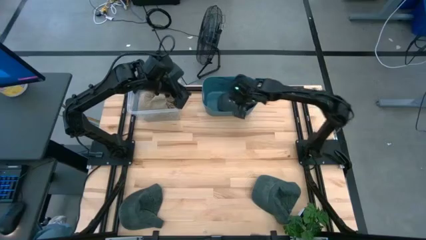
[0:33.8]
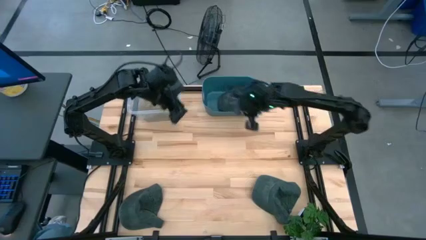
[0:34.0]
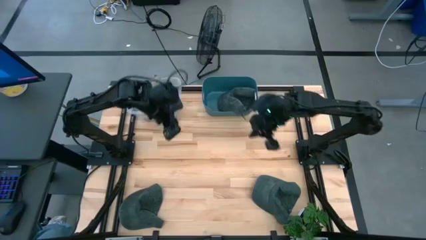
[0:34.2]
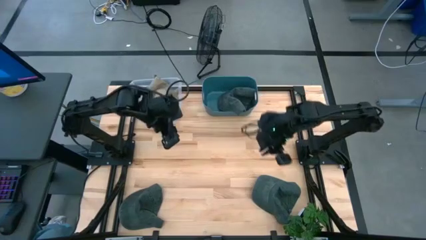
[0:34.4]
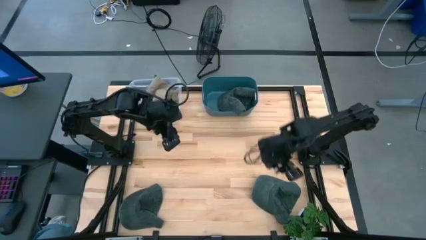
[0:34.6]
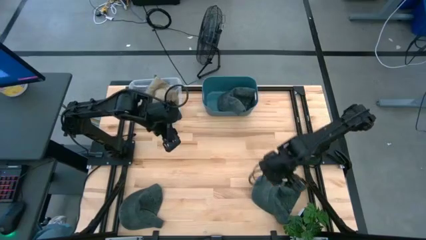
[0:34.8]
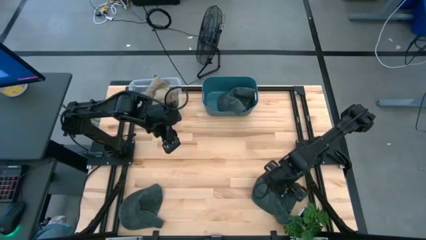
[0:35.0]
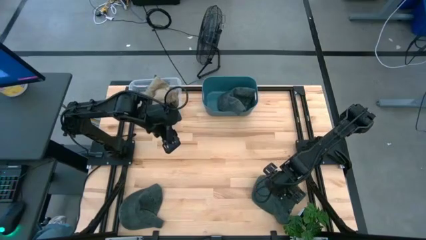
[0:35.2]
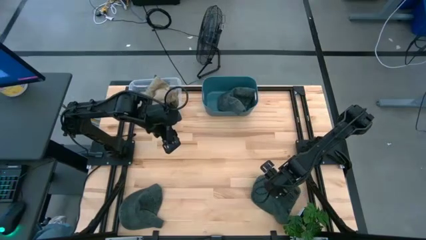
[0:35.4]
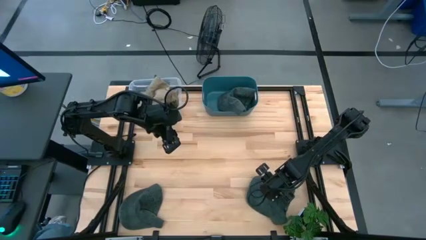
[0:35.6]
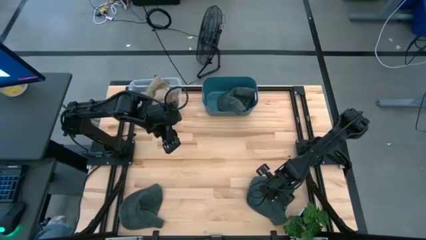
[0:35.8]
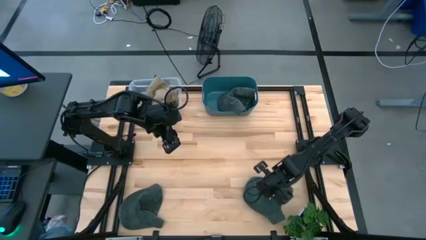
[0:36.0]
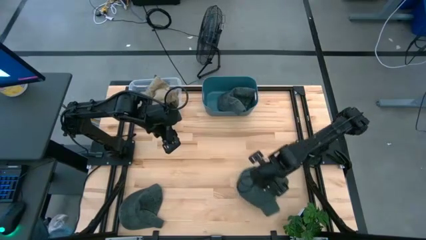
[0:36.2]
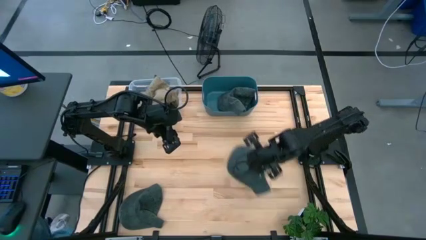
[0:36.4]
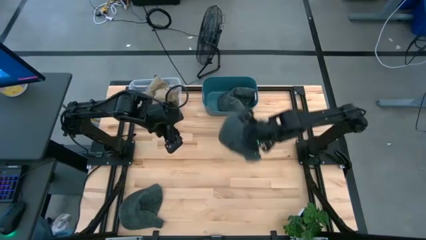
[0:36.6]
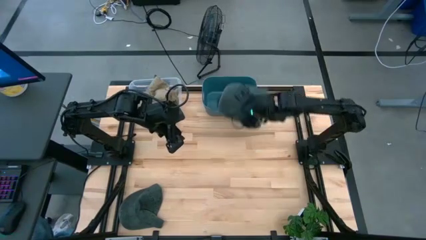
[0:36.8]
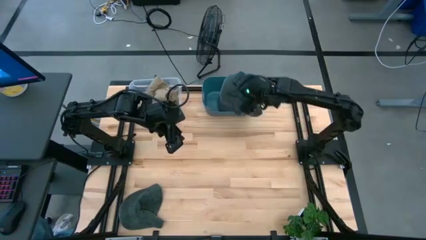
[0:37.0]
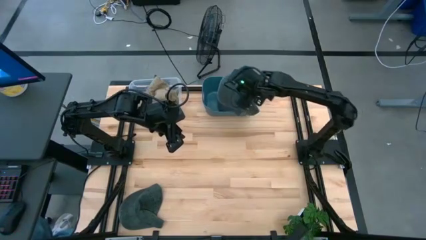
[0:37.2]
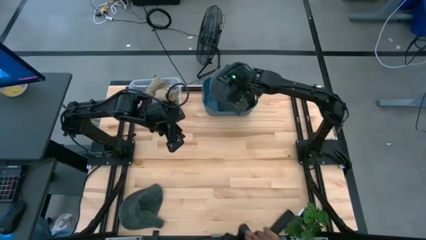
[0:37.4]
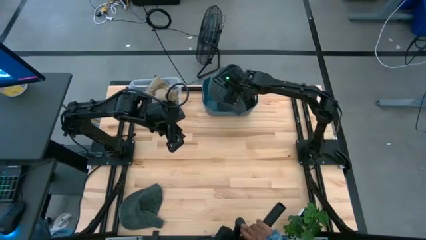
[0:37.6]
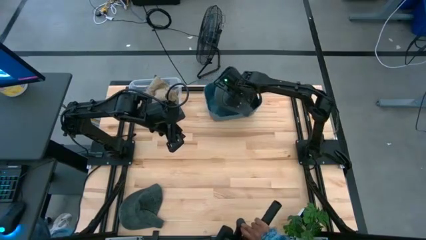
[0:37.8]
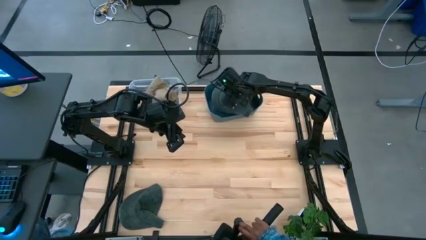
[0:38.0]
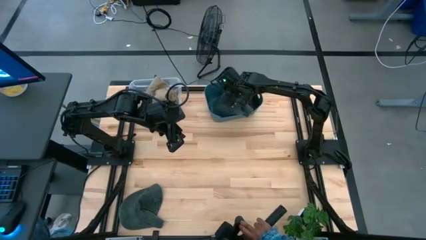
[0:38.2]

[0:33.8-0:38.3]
Task: Pick & Place hat
Put the right gray cap into the green bin

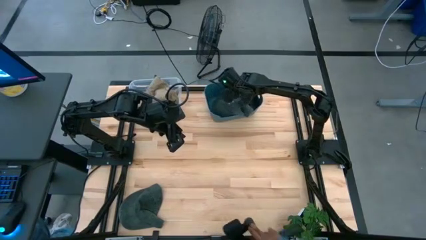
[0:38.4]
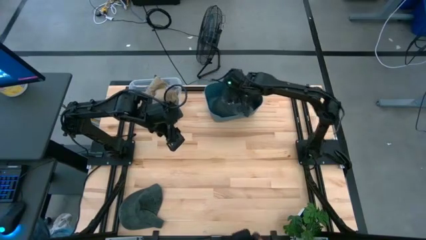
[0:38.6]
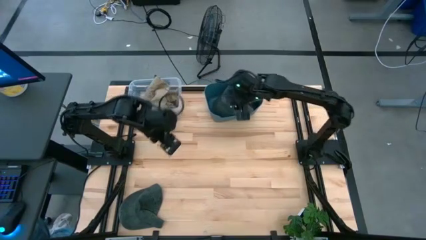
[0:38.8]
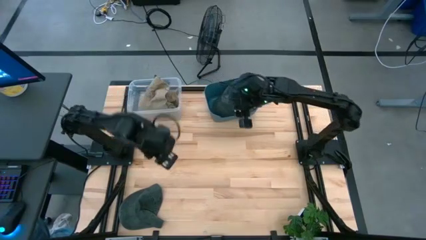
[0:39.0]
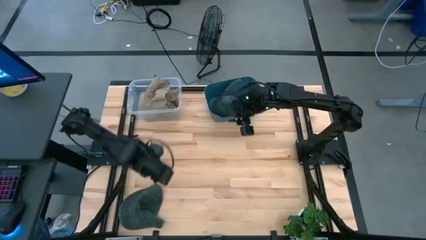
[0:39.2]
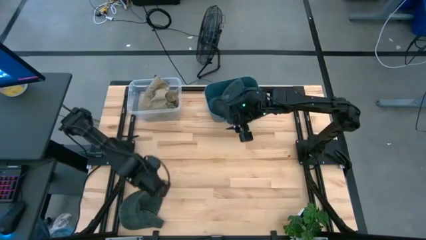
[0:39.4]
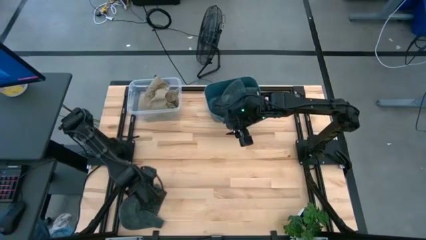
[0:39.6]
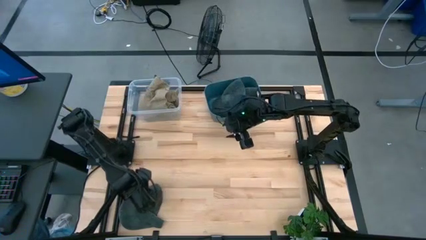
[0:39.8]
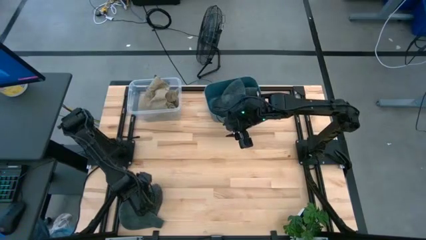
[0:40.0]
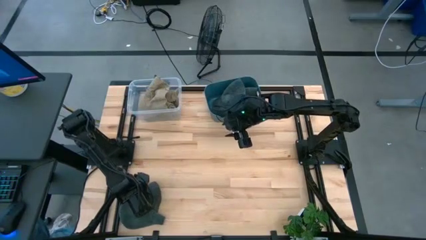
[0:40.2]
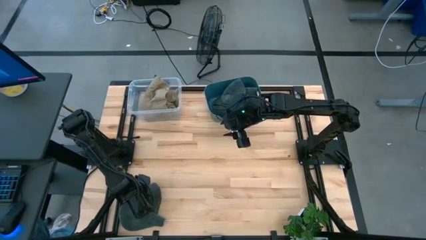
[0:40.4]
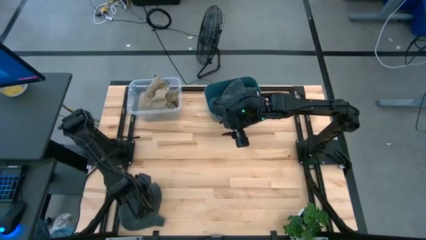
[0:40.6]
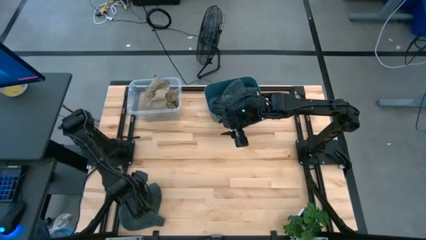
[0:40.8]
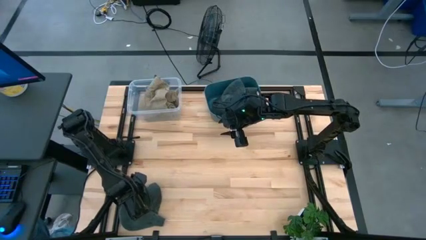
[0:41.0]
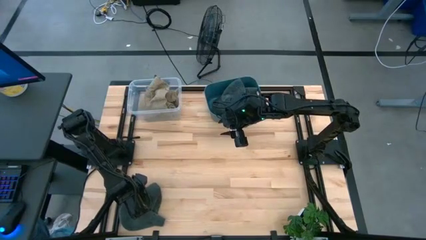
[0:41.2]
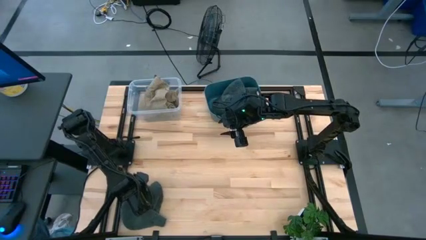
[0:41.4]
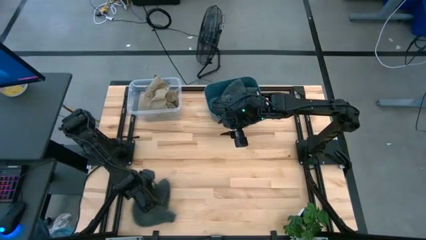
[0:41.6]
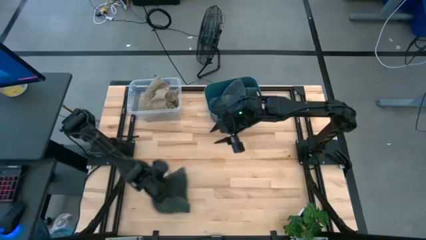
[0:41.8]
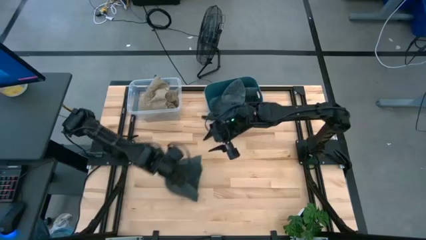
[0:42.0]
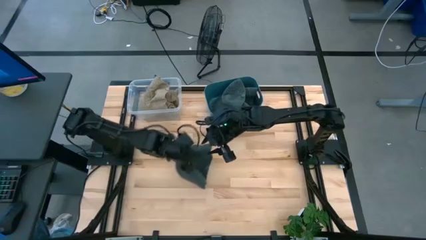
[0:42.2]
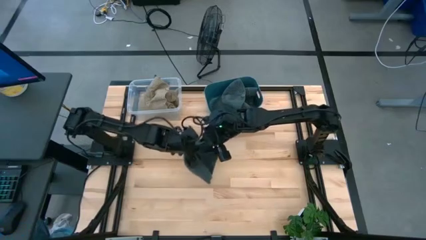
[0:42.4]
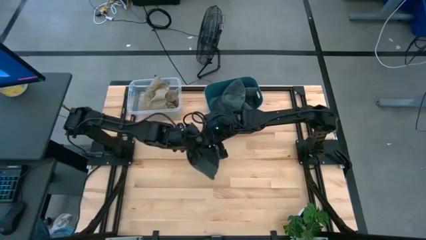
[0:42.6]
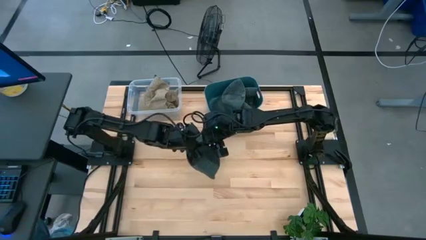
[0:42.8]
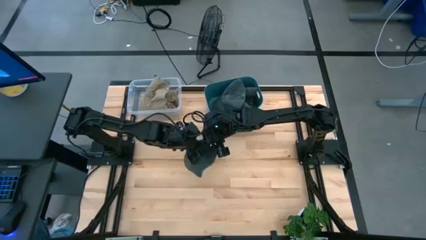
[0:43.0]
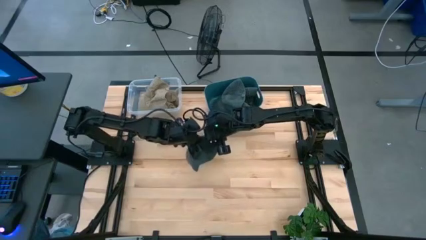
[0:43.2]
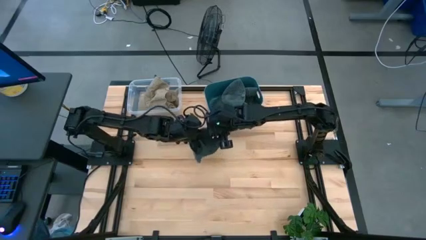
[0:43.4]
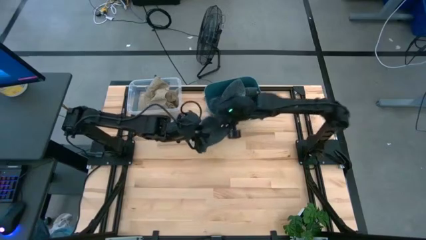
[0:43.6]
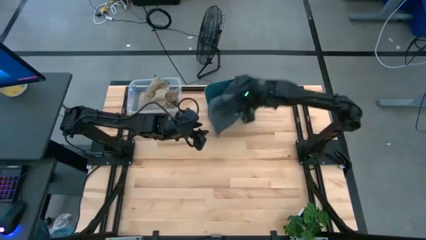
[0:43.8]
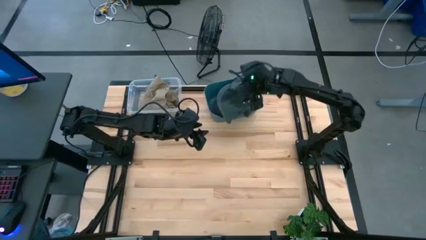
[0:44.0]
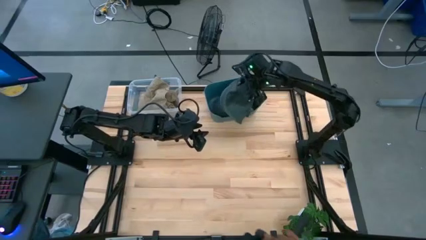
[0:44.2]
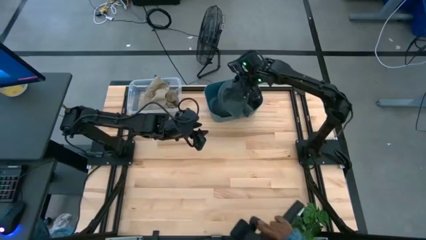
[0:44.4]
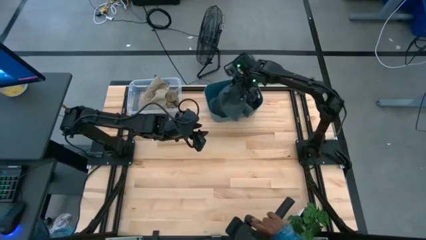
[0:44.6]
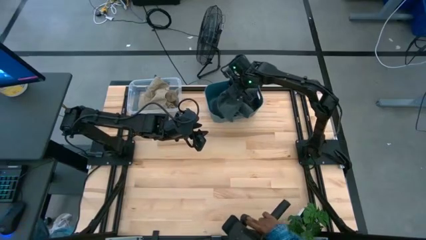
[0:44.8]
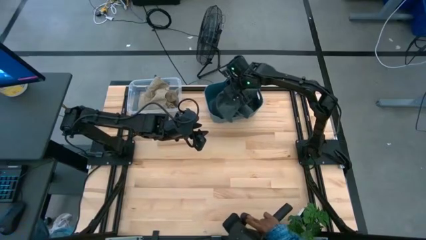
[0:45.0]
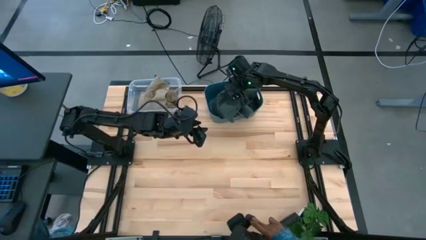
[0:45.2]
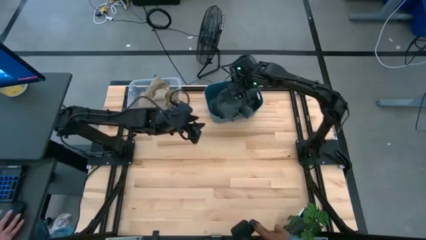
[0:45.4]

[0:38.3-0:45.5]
Put the gray cap into the green bin

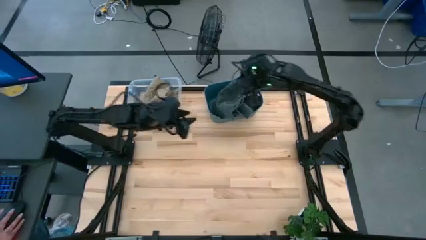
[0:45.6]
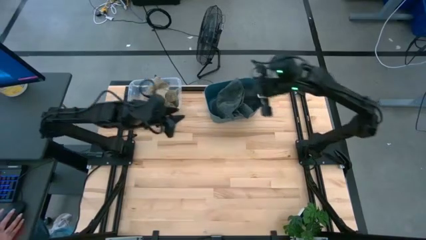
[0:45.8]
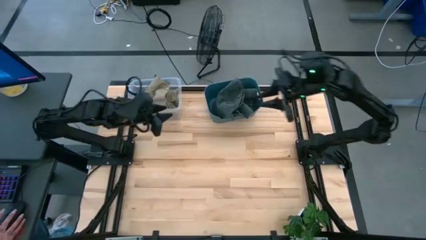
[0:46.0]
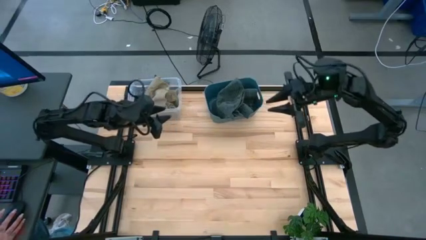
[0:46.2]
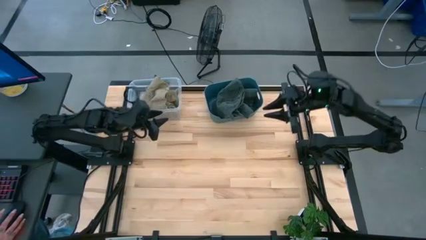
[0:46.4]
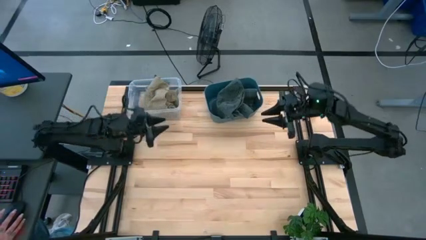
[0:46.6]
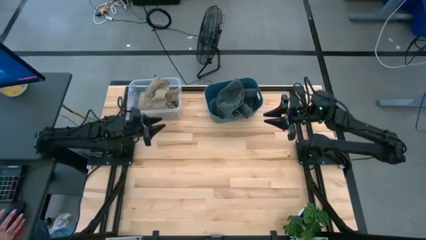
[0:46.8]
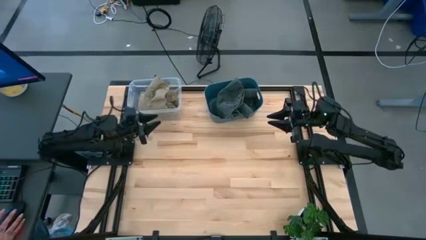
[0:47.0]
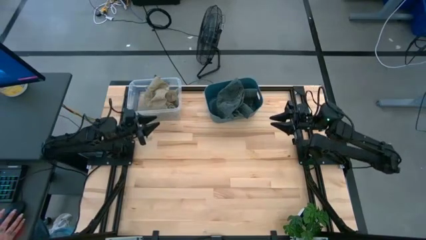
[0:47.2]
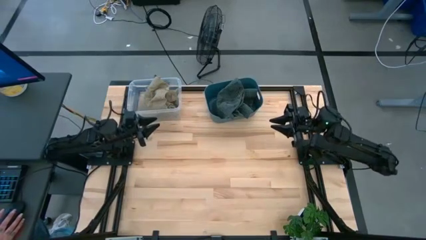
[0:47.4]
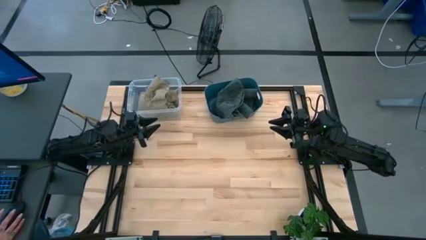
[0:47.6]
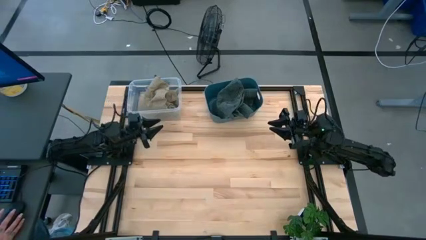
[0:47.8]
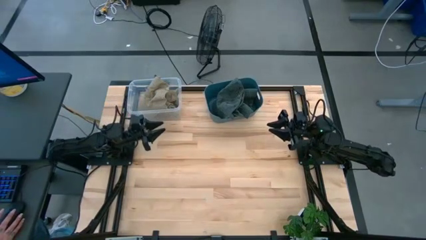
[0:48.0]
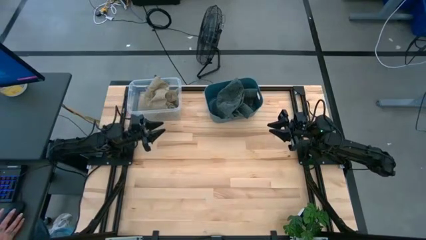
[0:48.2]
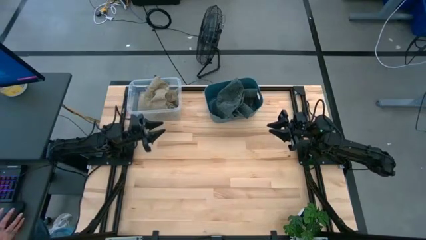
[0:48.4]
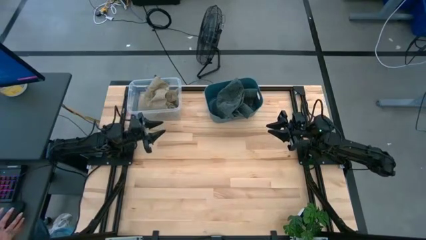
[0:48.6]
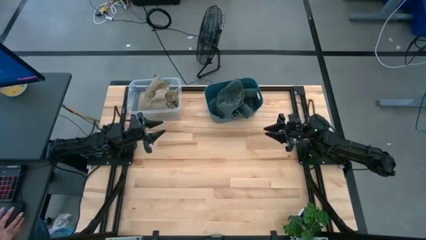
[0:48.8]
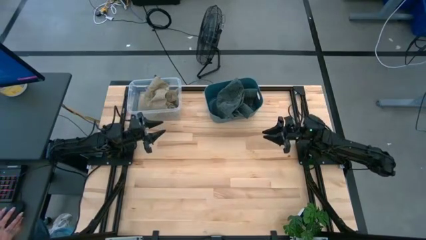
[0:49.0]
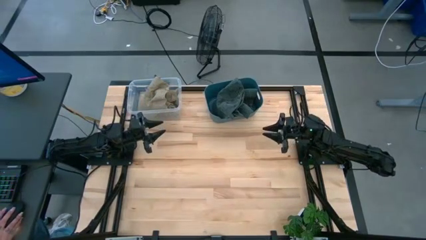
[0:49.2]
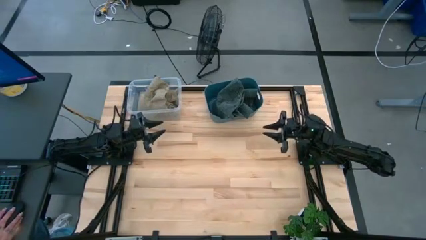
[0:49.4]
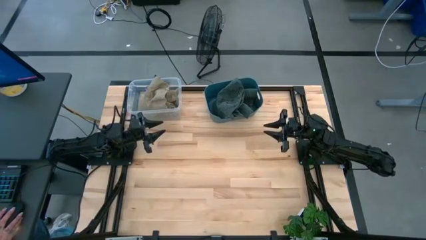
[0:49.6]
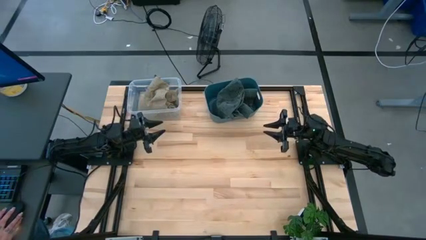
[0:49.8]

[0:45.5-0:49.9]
Return to Home Position
